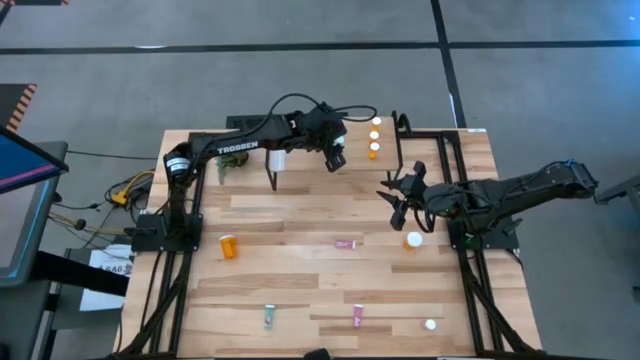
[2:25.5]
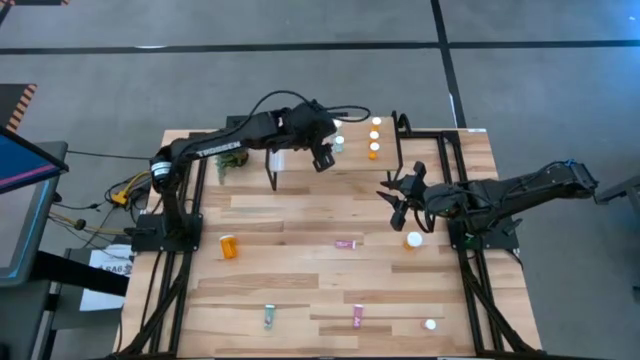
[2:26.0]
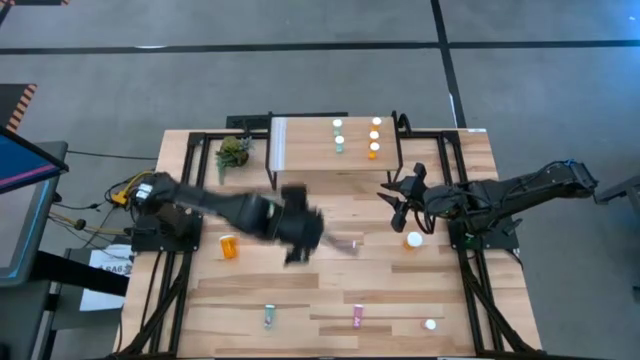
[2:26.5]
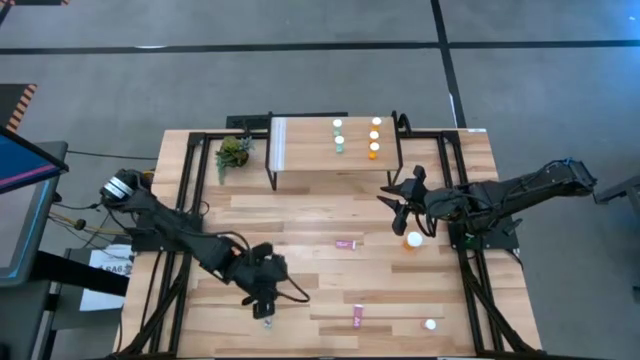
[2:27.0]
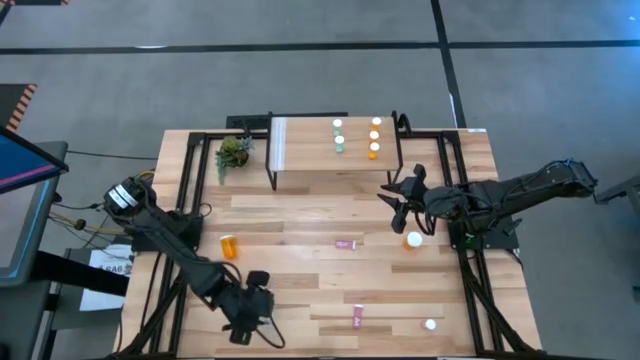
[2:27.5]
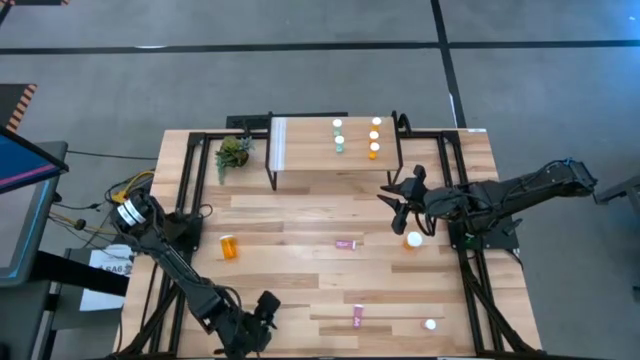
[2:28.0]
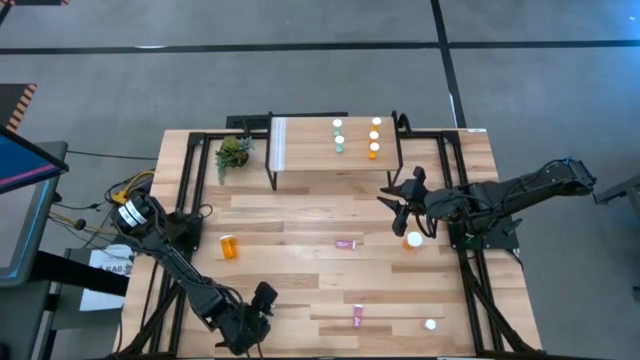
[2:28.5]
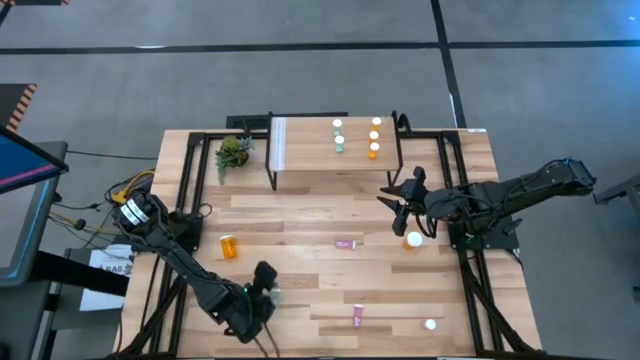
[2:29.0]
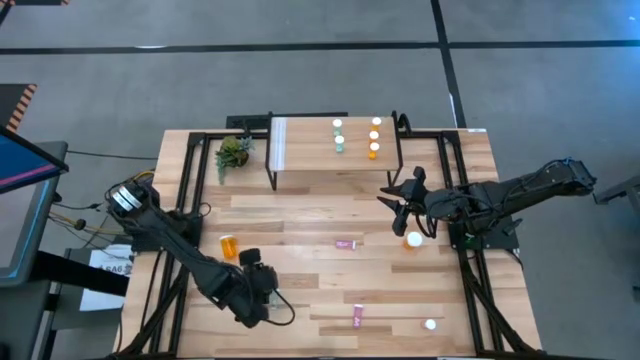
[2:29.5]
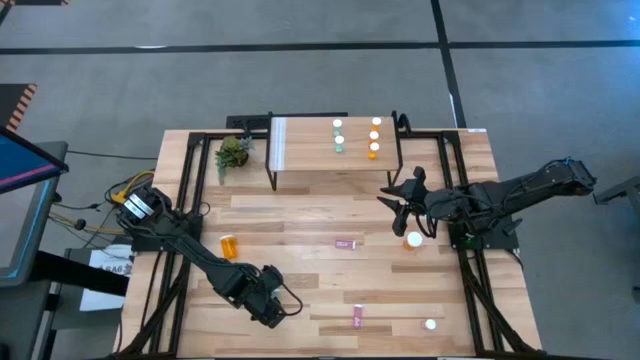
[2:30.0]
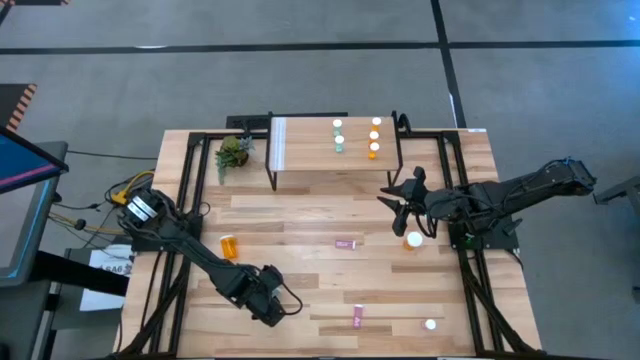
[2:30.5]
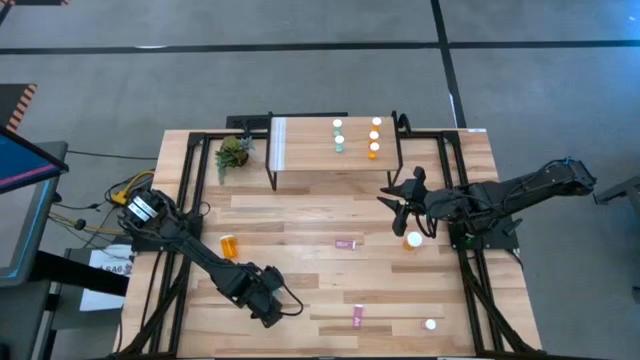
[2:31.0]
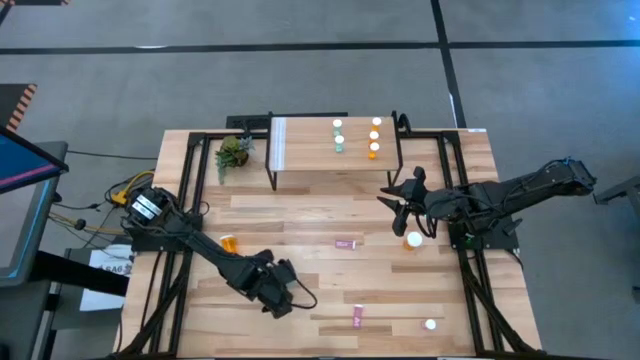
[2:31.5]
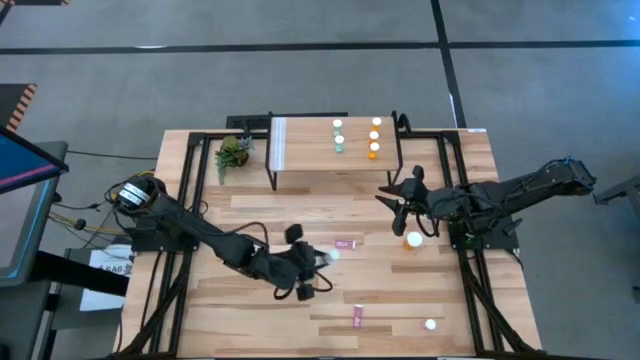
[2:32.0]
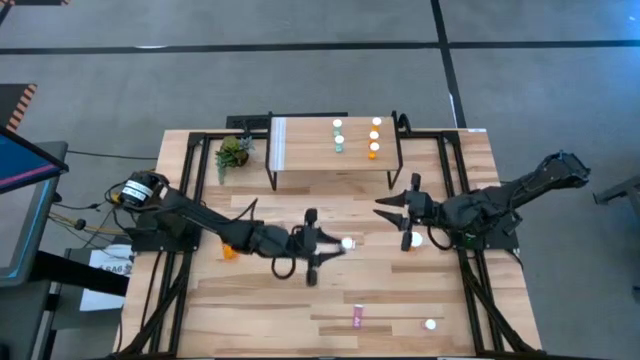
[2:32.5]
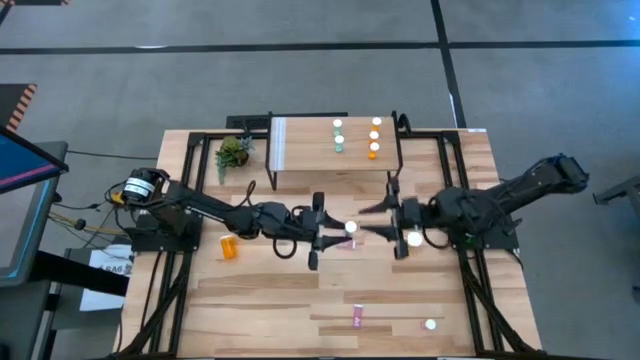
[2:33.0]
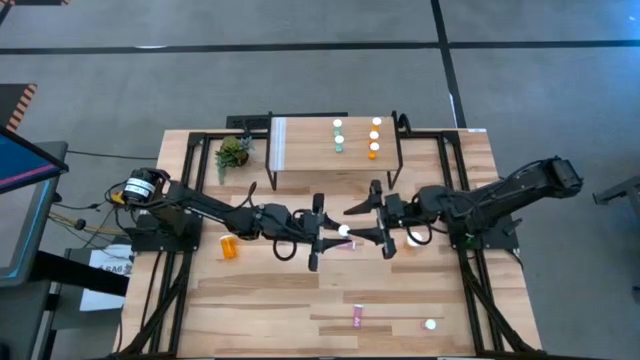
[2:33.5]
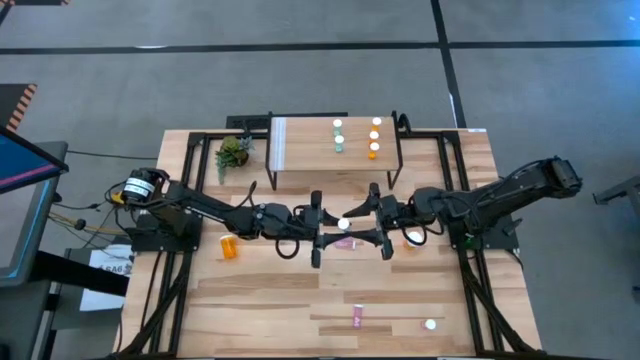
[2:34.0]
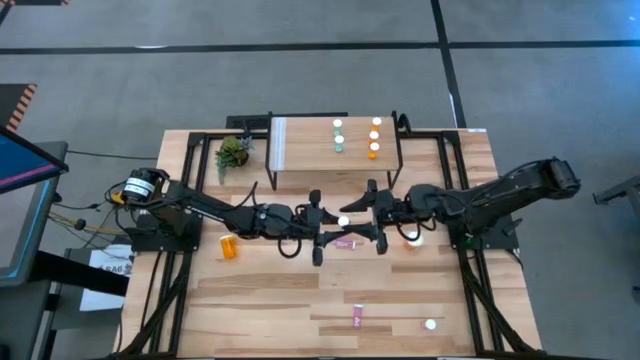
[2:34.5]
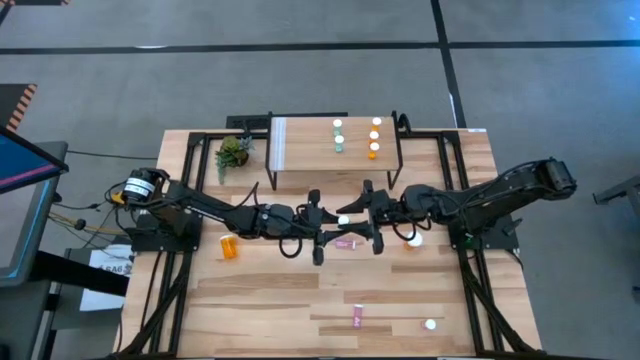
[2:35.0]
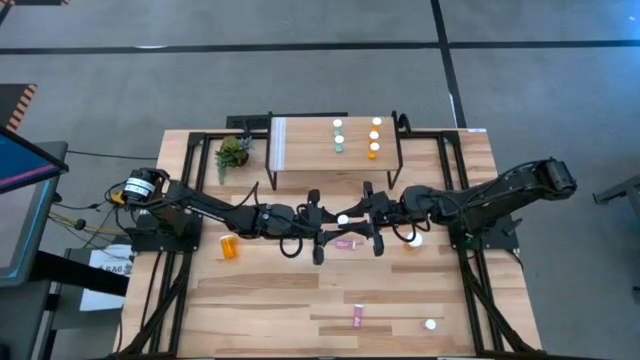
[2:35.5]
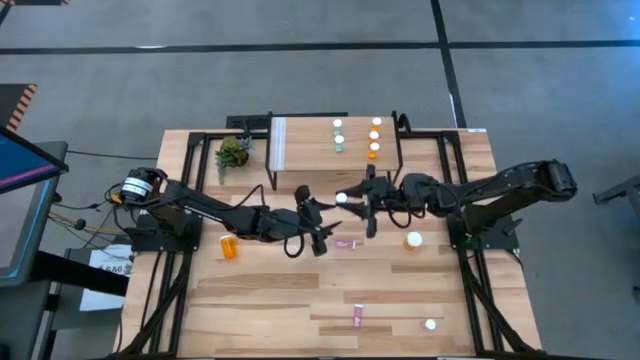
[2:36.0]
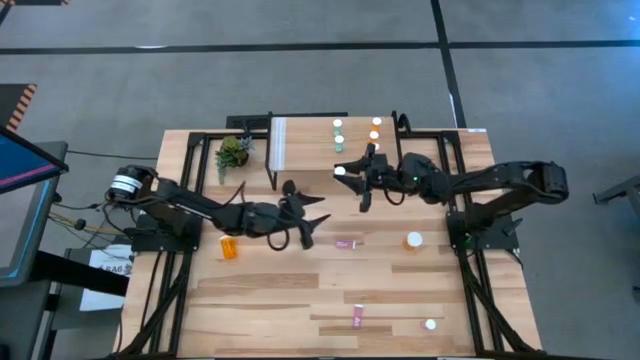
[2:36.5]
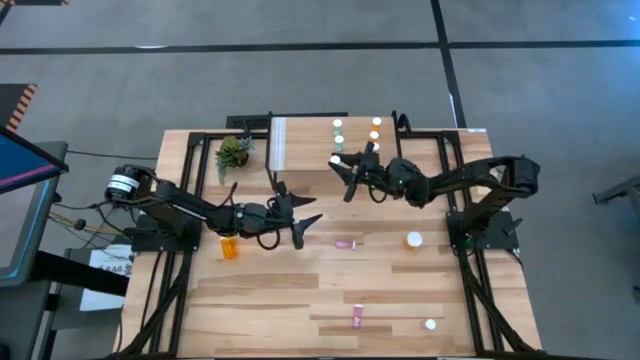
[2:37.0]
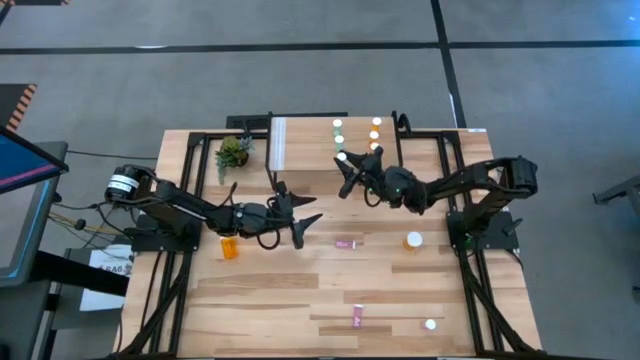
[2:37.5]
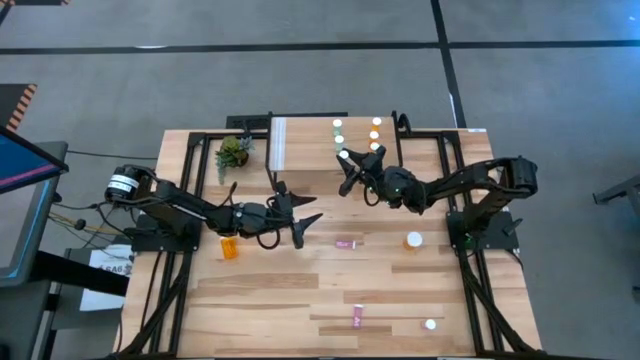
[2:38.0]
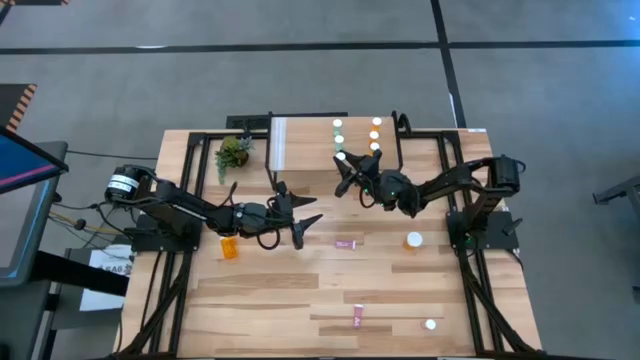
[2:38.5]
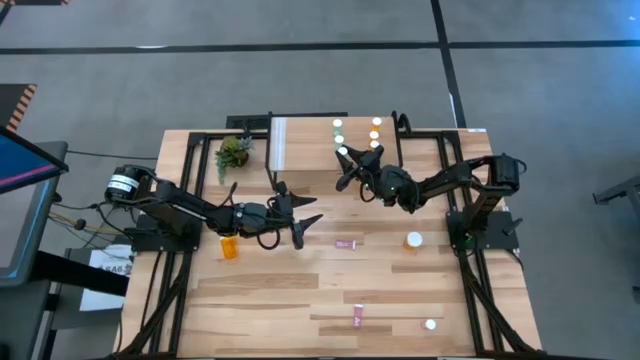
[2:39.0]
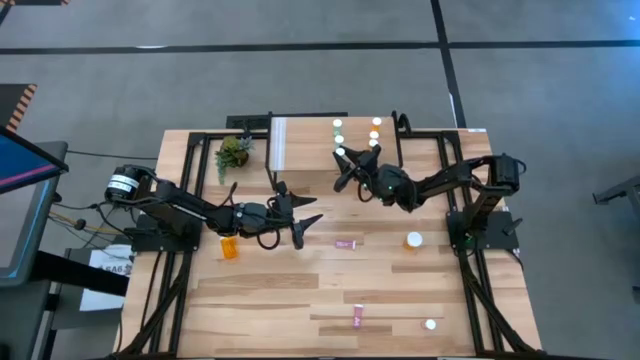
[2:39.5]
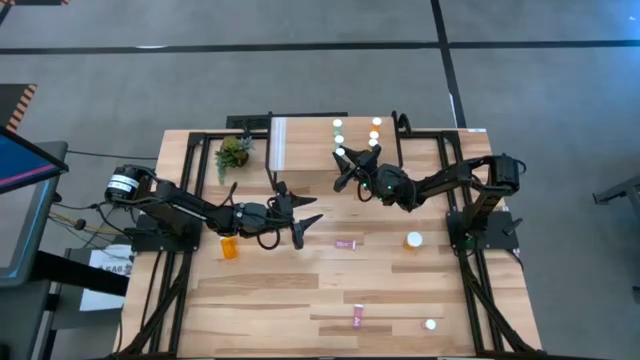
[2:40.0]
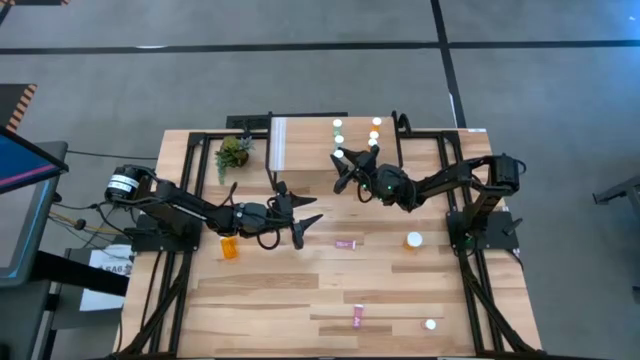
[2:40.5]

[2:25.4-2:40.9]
Task: Pick and place medicine bottles onto shelf by color
Put the blue pill bottle on the shelf aligned with the other blue pill bottles

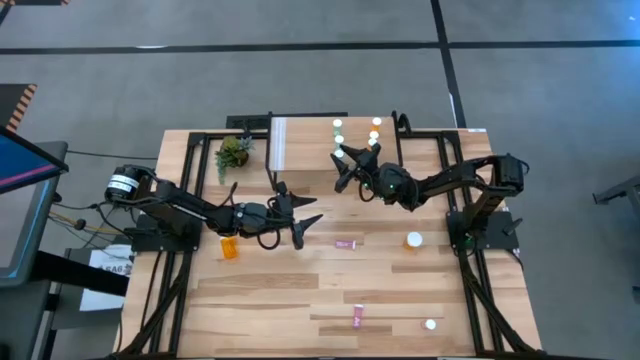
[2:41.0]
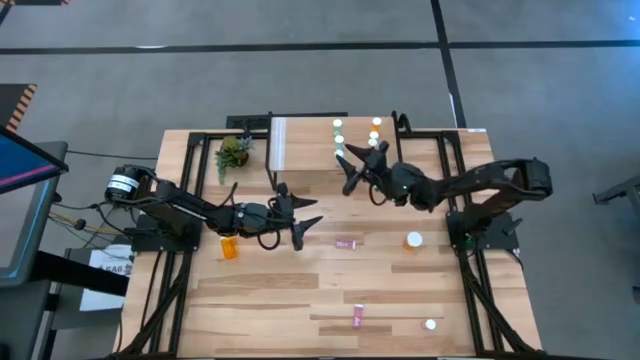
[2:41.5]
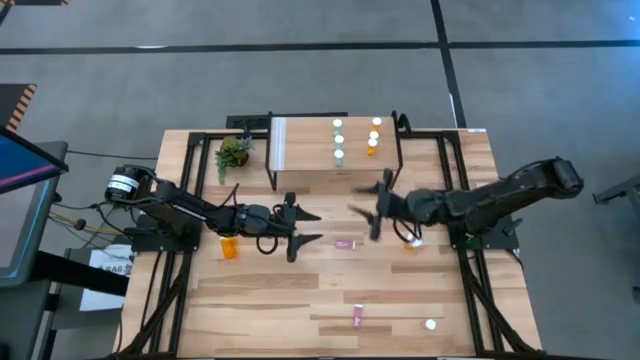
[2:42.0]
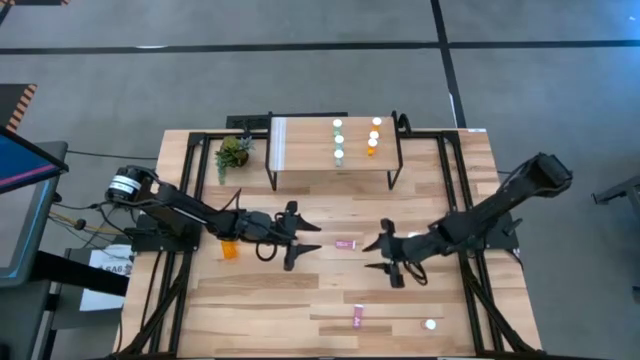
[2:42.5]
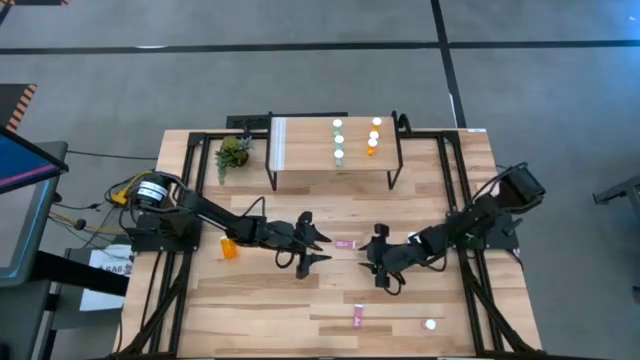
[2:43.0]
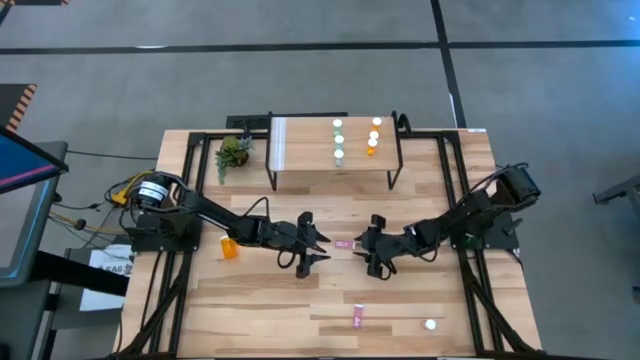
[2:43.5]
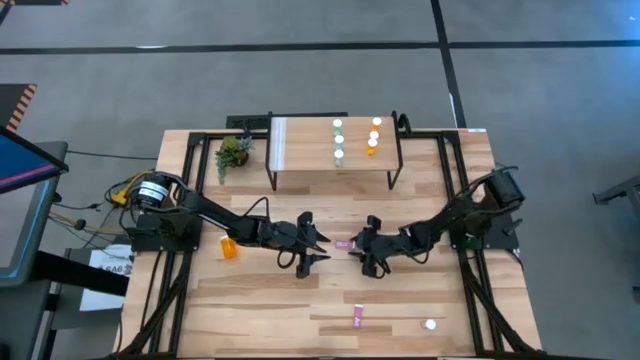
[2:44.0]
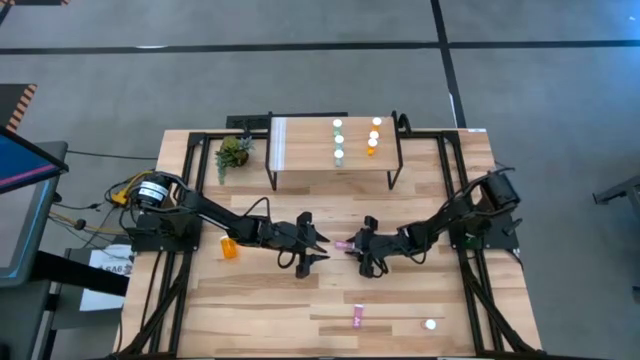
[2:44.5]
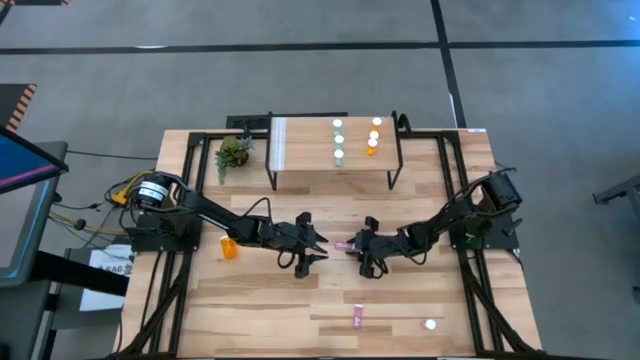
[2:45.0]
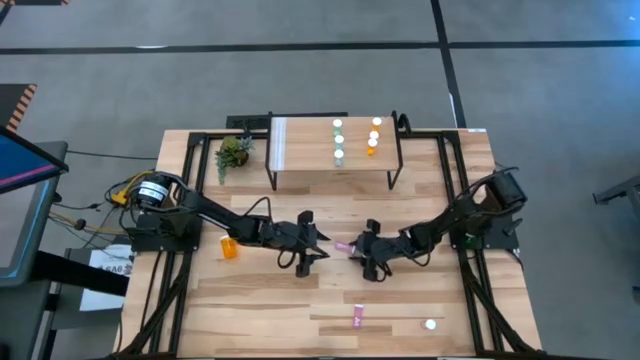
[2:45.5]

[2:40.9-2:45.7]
Put the top pink pill bottle on the shelf

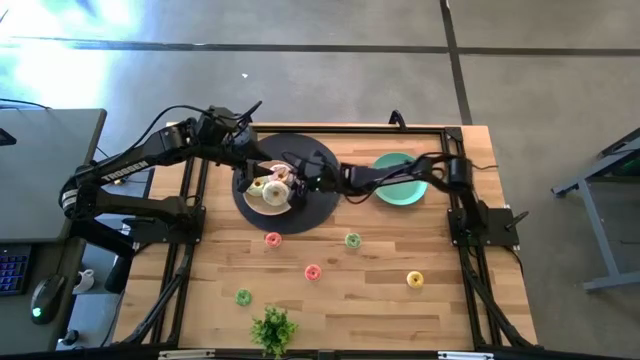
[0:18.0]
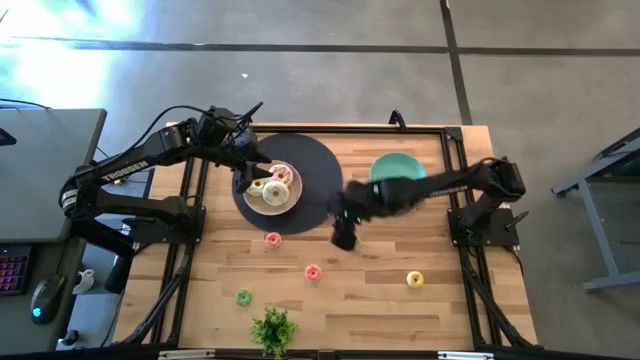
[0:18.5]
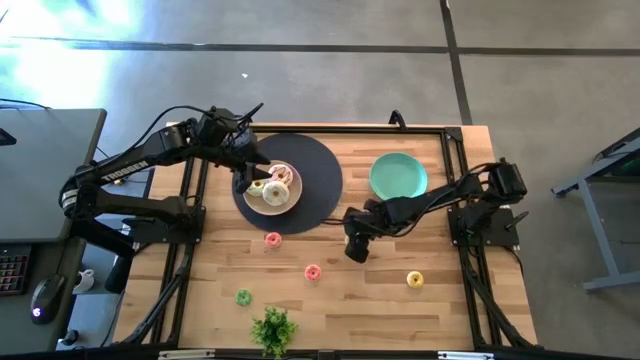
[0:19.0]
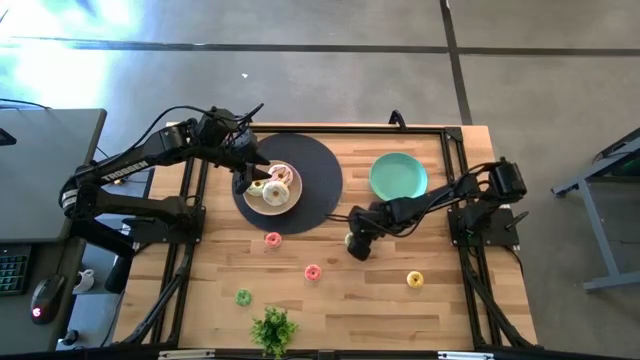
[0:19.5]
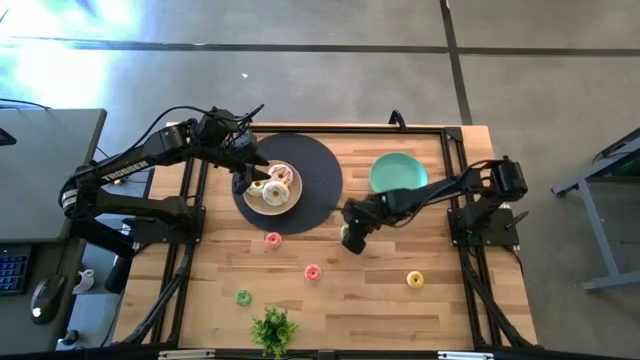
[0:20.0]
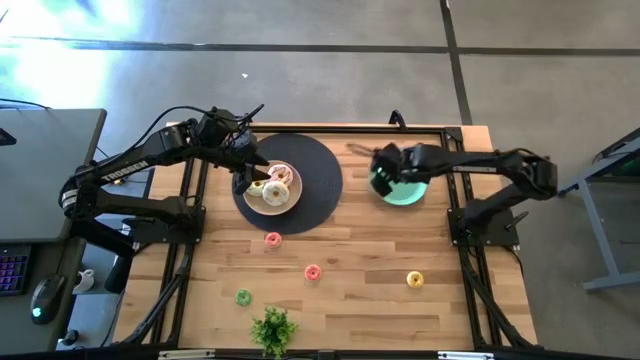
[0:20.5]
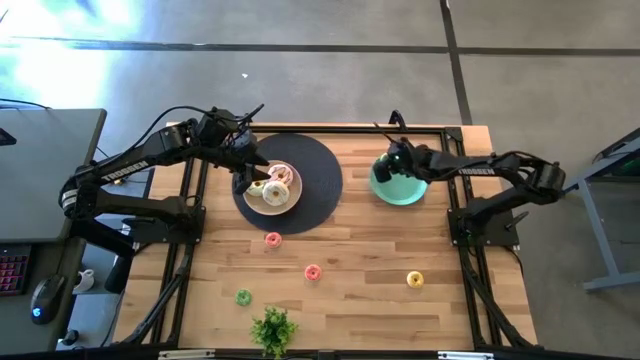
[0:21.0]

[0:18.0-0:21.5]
Task: Pick & Place donuts
Put the top small green donut on the green plate
